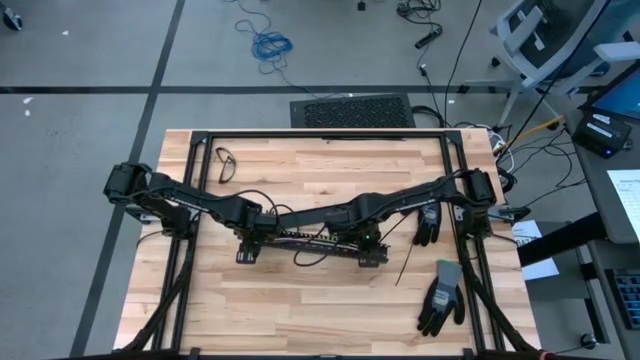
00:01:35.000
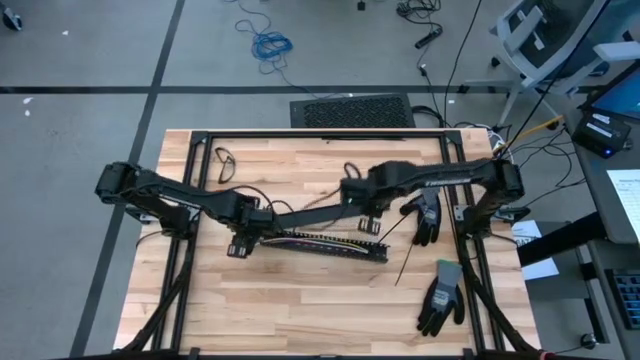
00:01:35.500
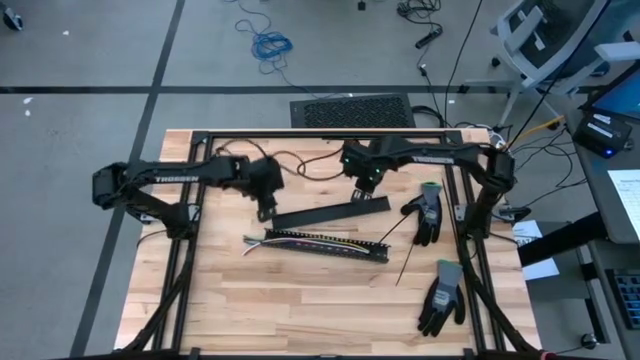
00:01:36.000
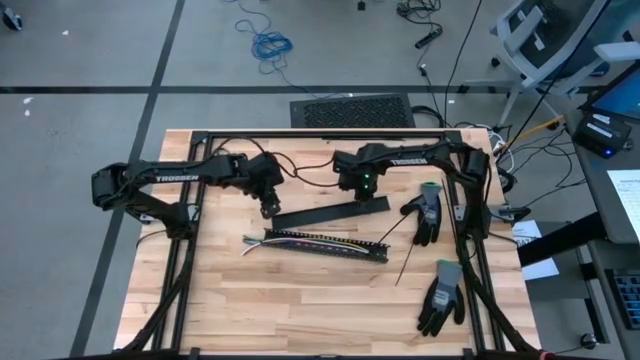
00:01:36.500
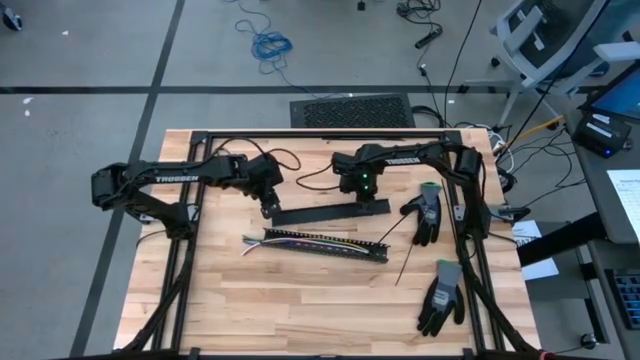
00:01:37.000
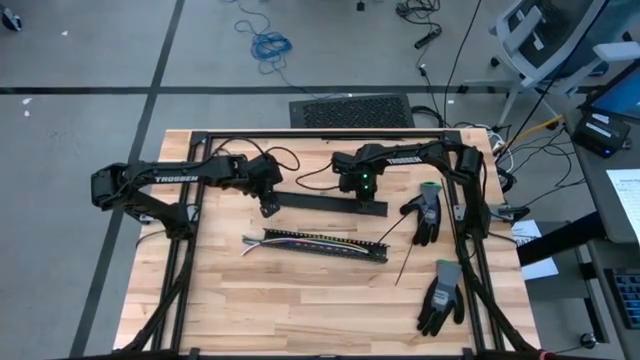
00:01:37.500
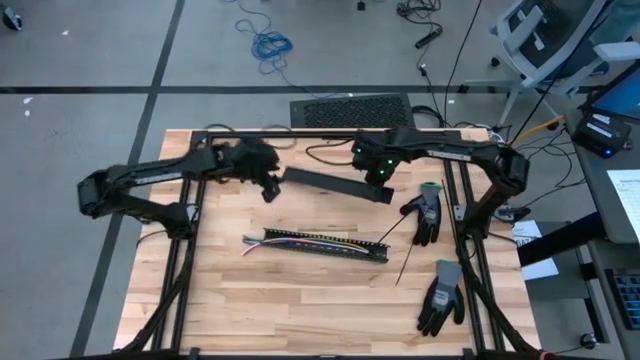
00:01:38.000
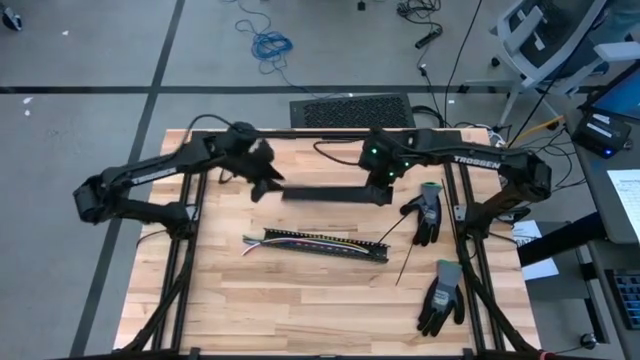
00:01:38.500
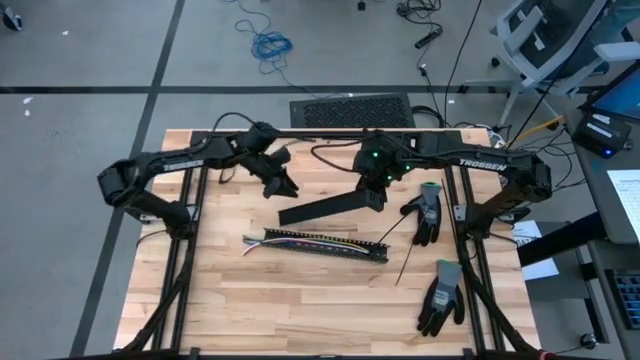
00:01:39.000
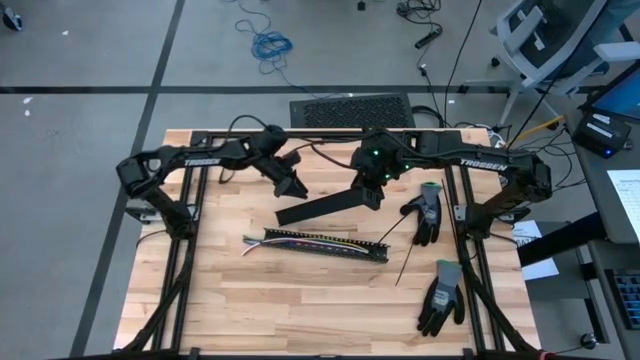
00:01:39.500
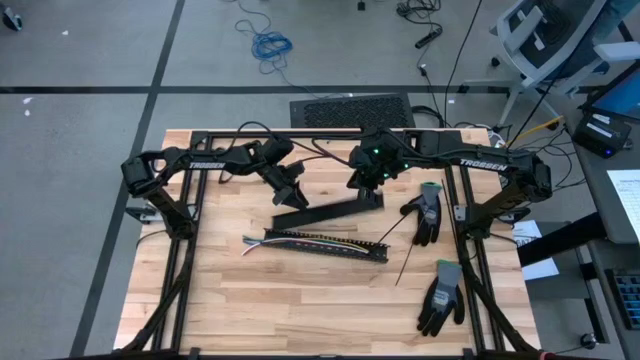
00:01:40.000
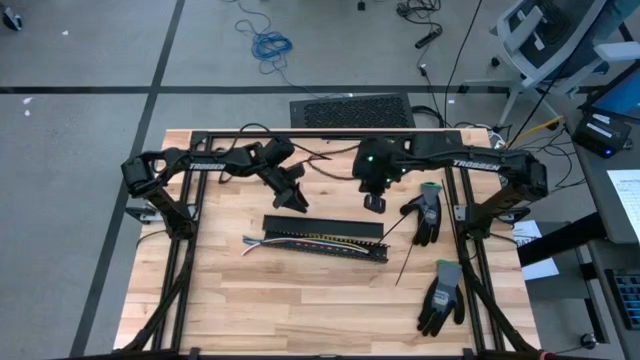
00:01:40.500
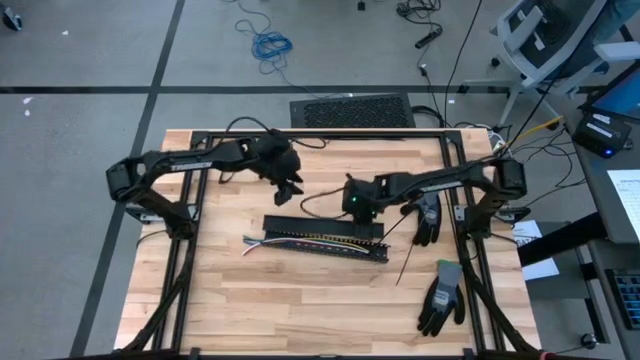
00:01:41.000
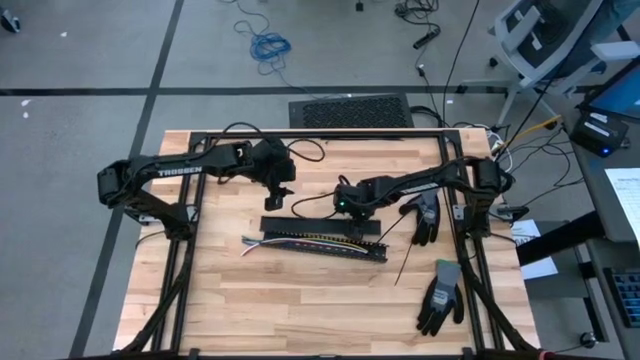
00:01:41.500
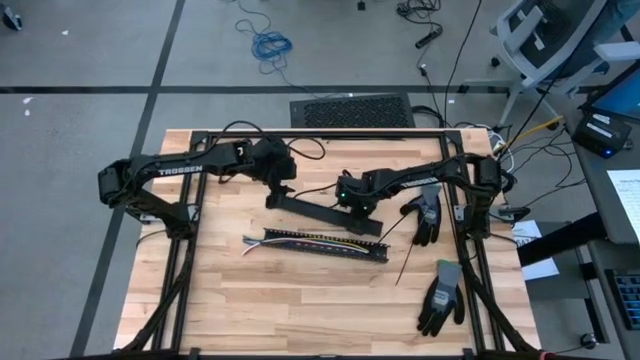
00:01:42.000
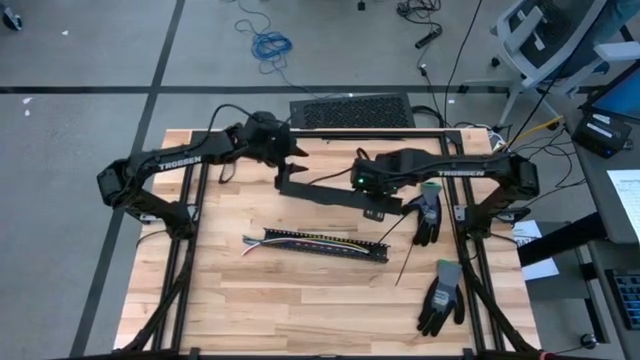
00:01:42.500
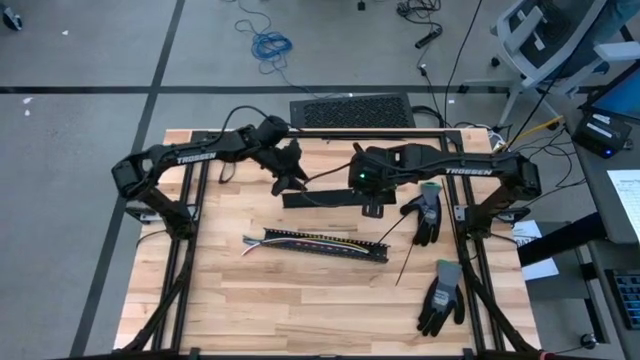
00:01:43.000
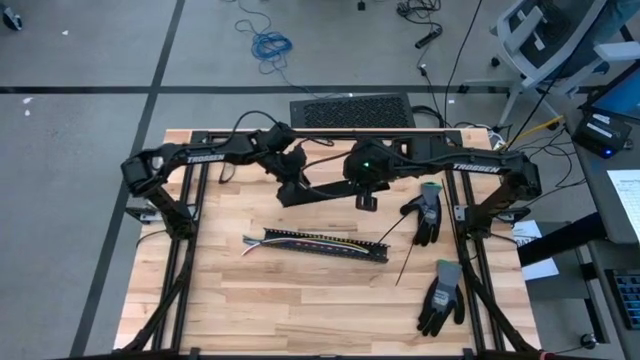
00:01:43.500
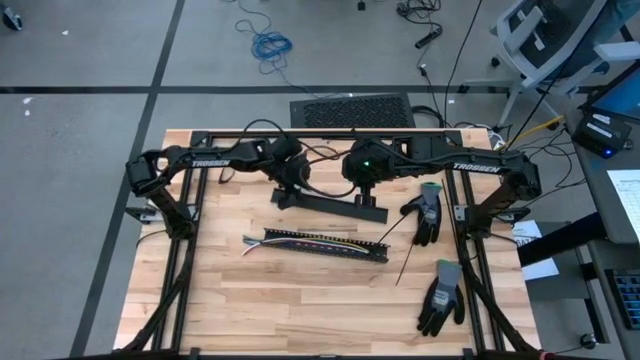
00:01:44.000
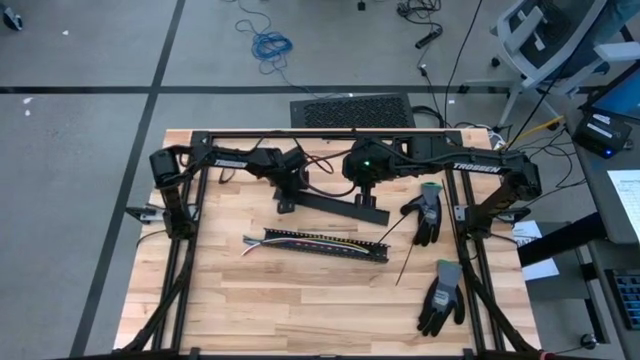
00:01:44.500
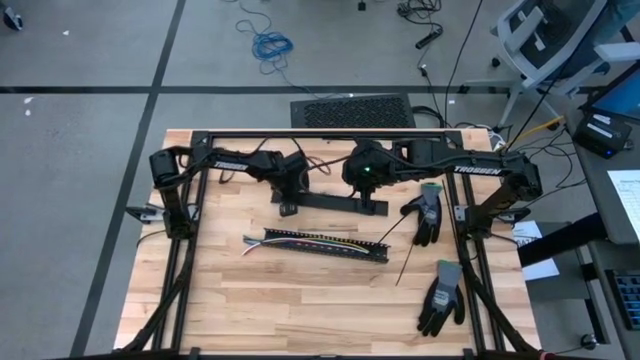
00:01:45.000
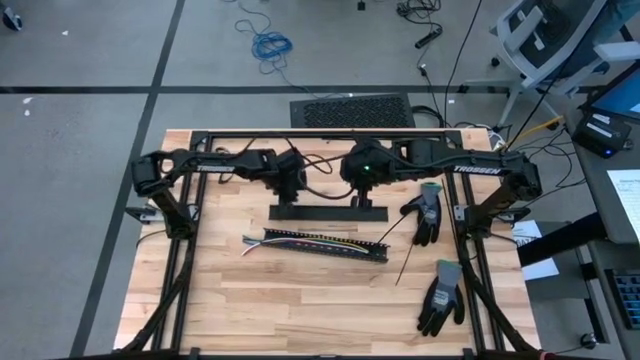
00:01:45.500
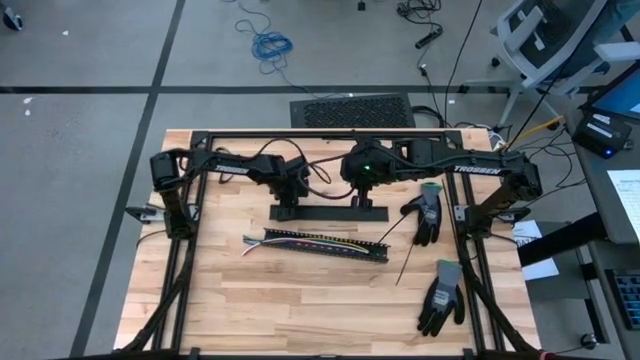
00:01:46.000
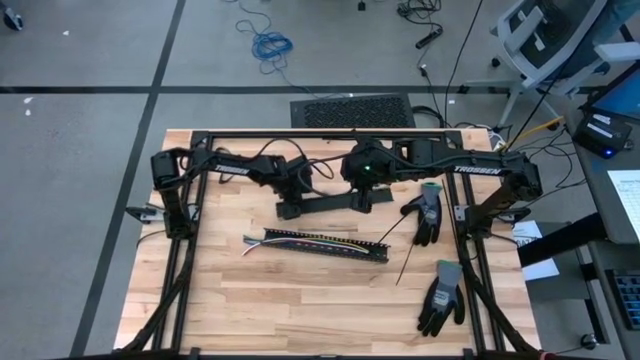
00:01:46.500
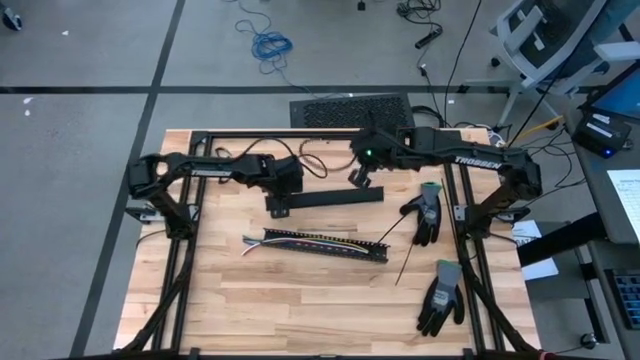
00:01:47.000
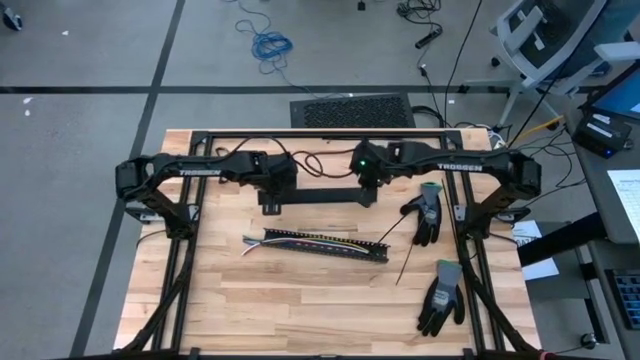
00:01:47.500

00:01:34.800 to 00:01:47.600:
Task: Ziptie cables
Close the black cable duct cover

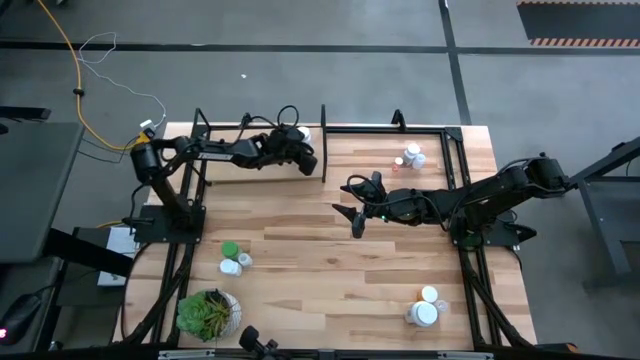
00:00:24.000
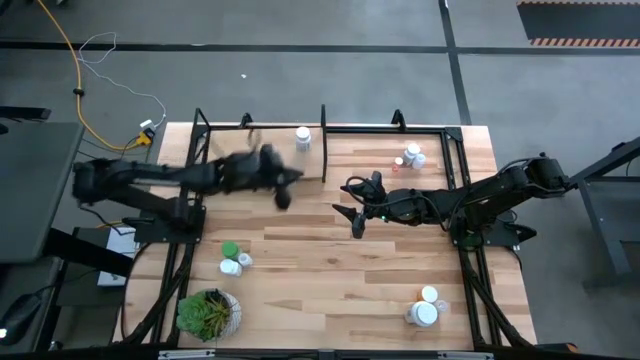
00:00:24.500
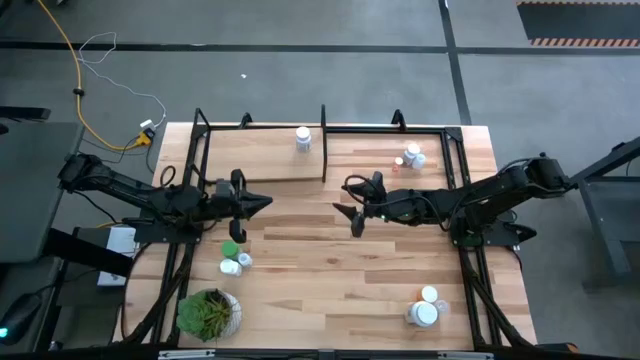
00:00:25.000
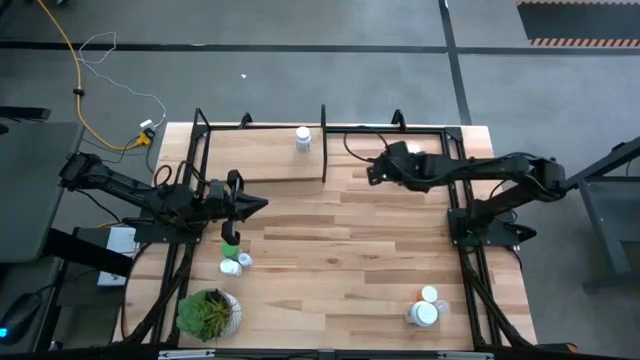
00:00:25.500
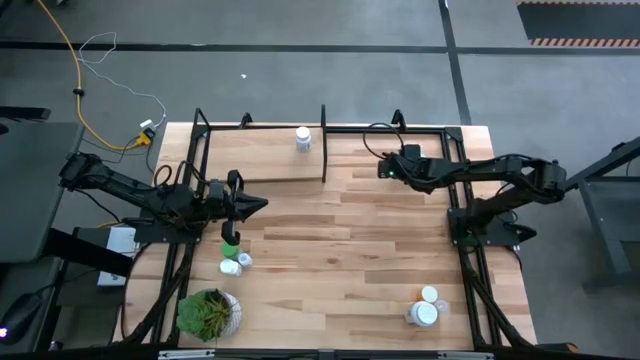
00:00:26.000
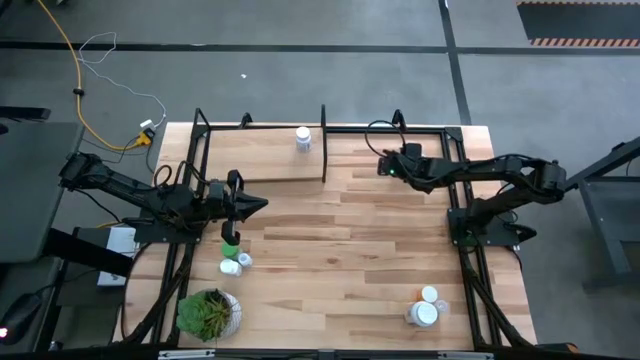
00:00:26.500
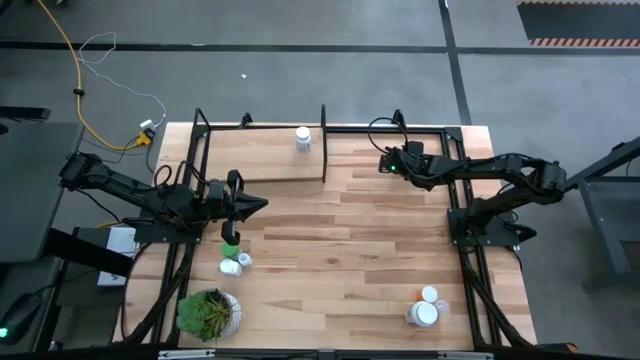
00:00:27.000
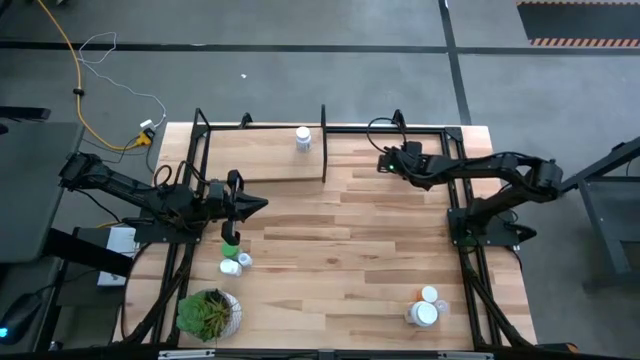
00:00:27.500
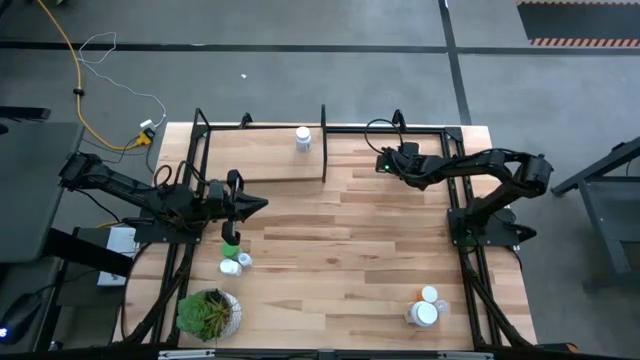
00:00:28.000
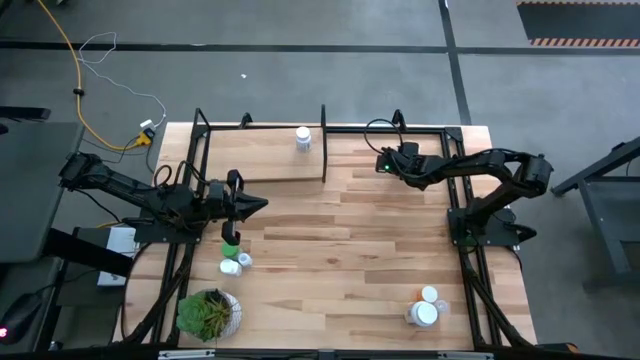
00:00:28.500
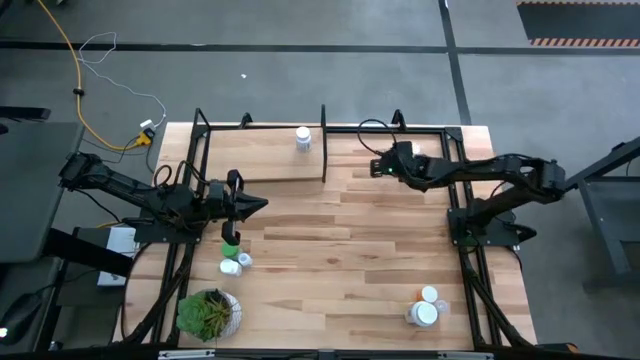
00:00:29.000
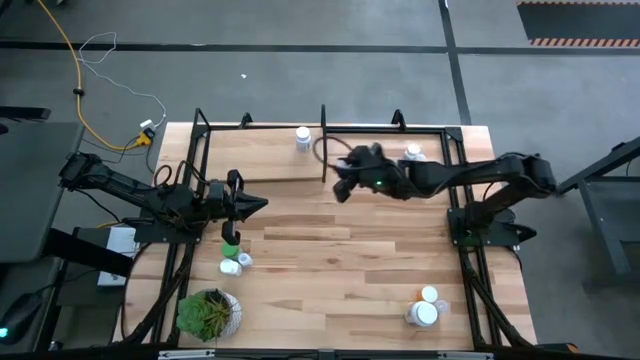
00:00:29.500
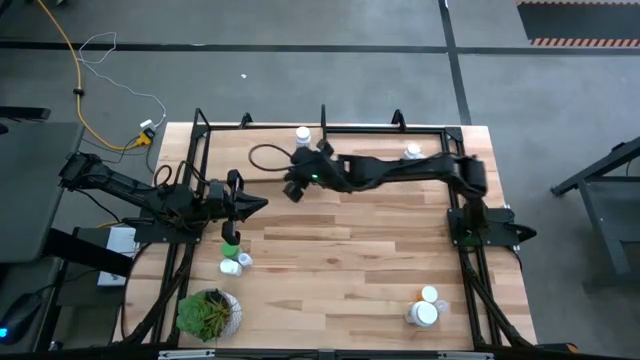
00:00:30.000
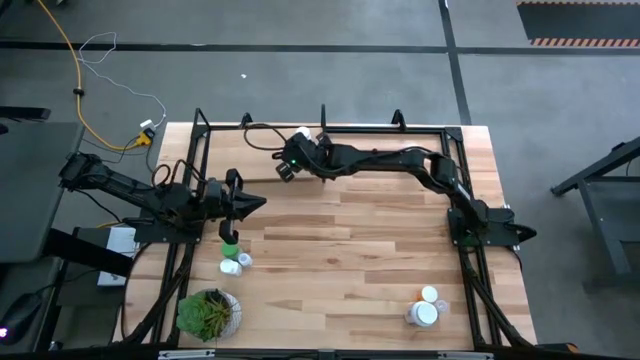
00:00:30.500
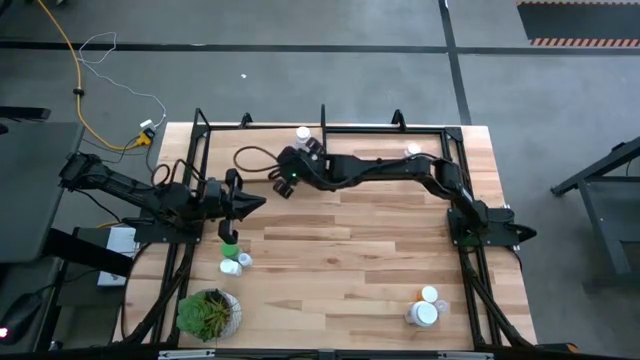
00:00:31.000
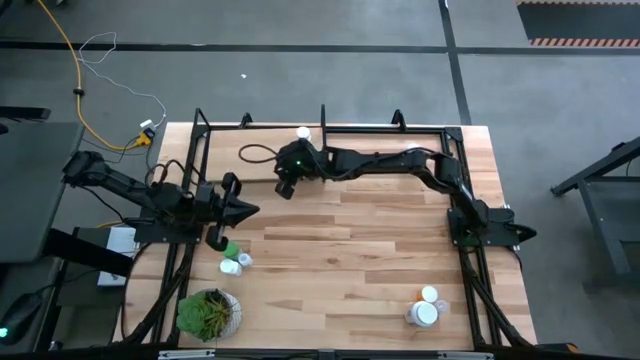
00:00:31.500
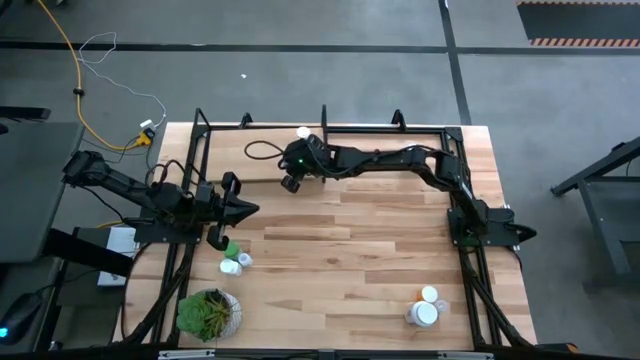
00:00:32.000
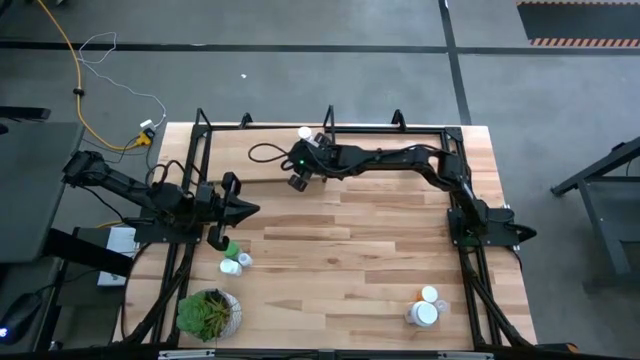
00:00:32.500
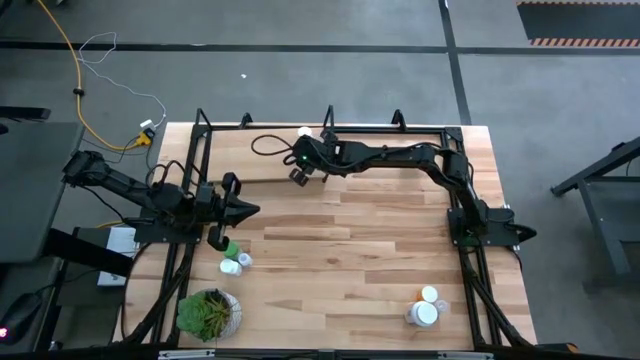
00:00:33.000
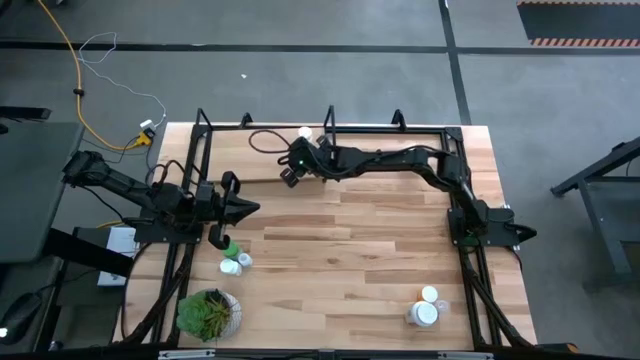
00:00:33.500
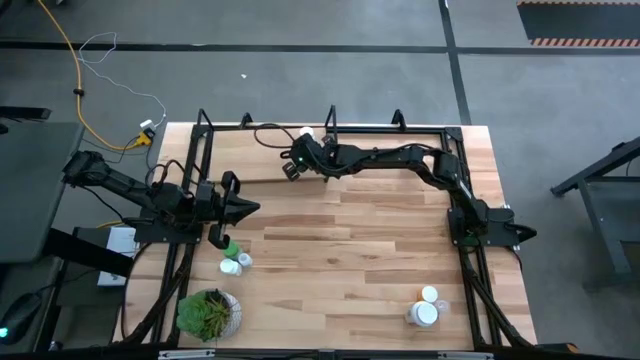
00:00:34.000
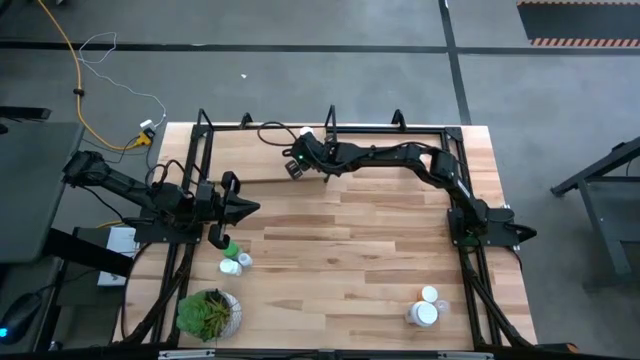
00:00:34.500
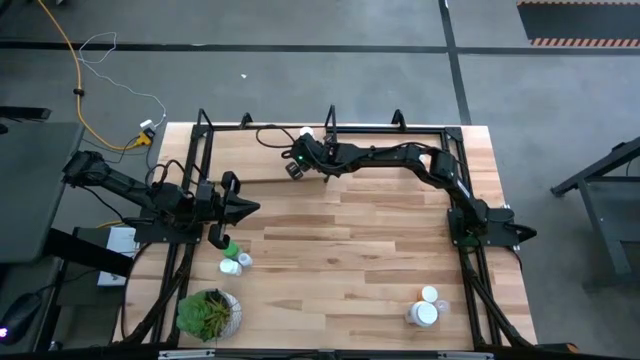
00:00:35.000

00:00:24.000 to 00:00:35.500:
Task: Pick and place medicine bottles onto shelf by color
Put the pink pill bottle on the shelf
